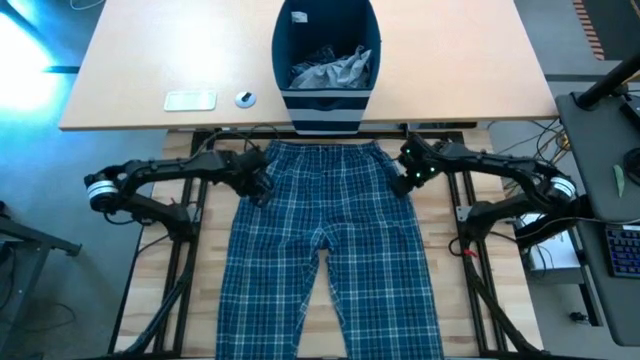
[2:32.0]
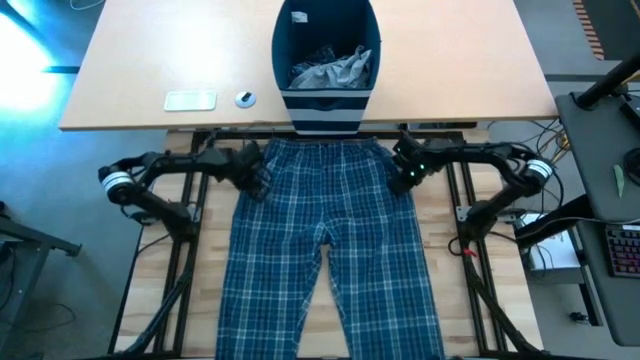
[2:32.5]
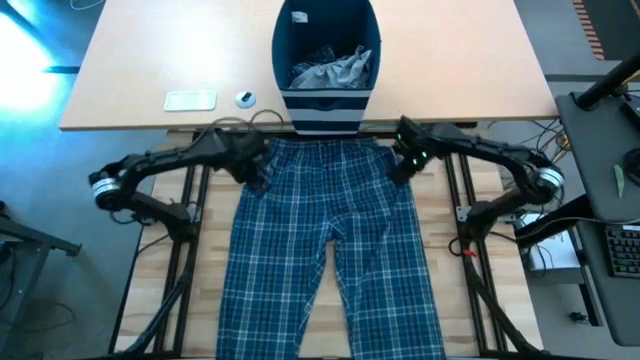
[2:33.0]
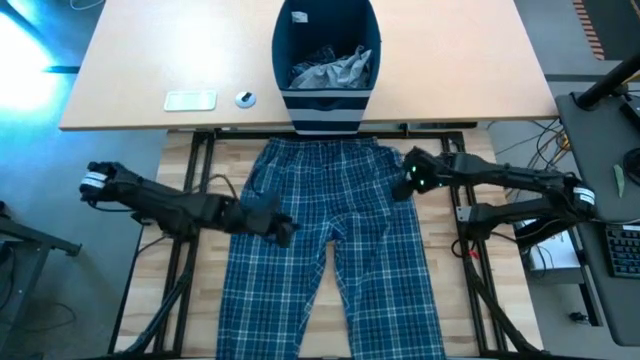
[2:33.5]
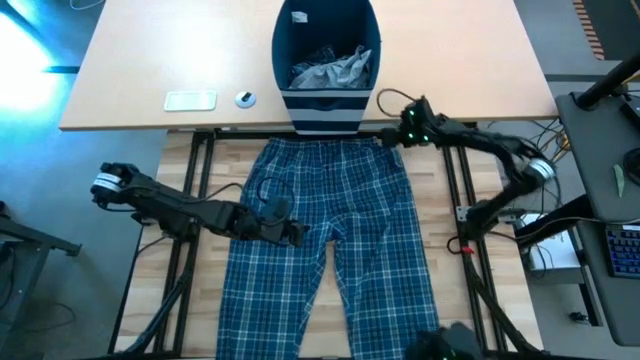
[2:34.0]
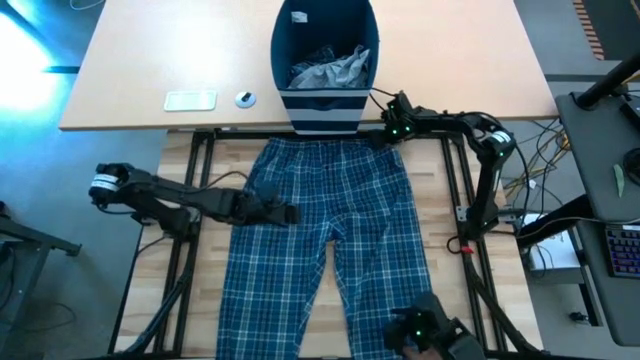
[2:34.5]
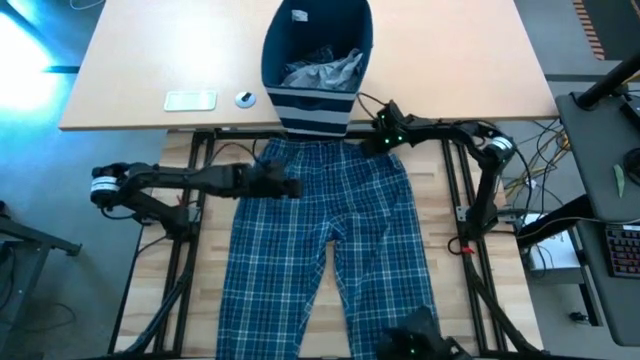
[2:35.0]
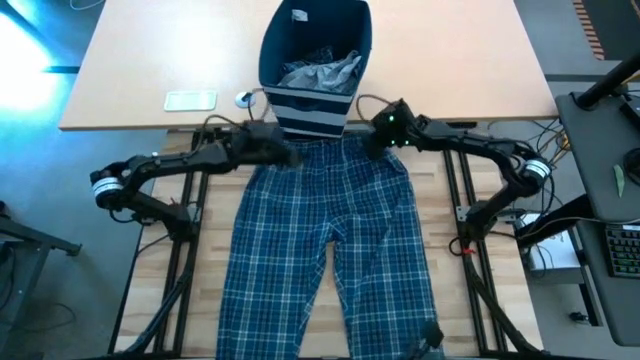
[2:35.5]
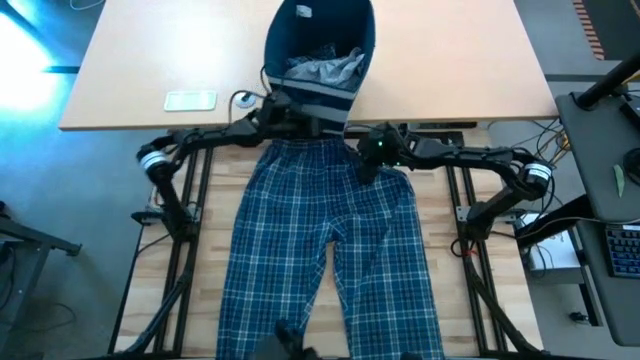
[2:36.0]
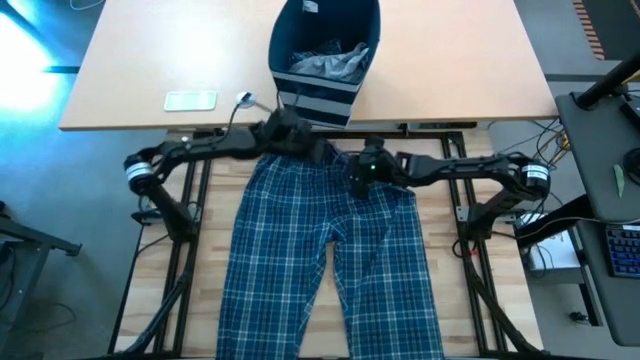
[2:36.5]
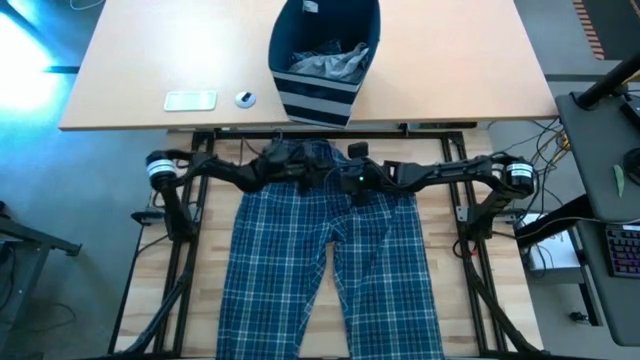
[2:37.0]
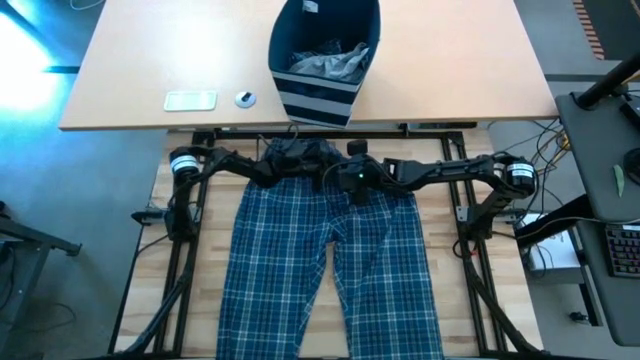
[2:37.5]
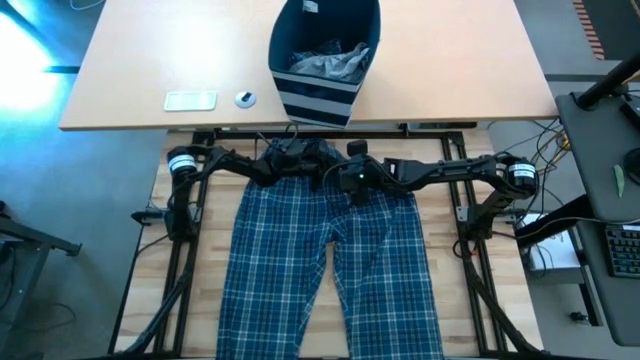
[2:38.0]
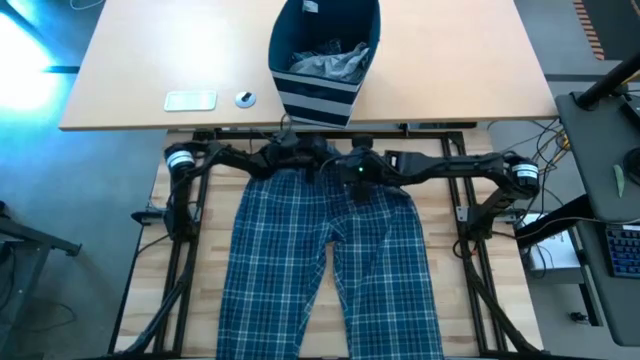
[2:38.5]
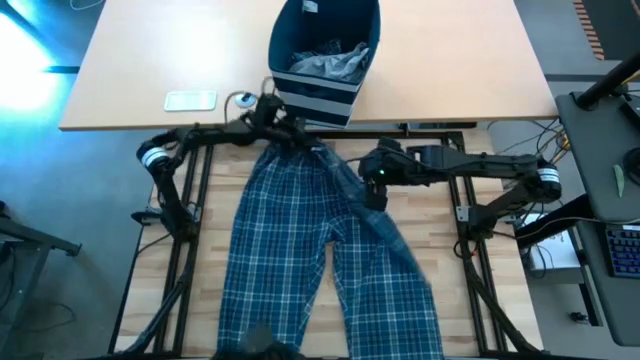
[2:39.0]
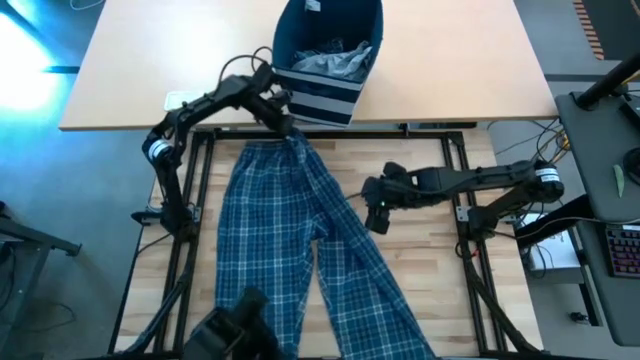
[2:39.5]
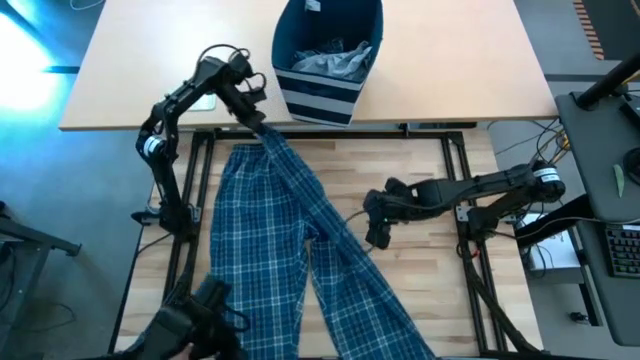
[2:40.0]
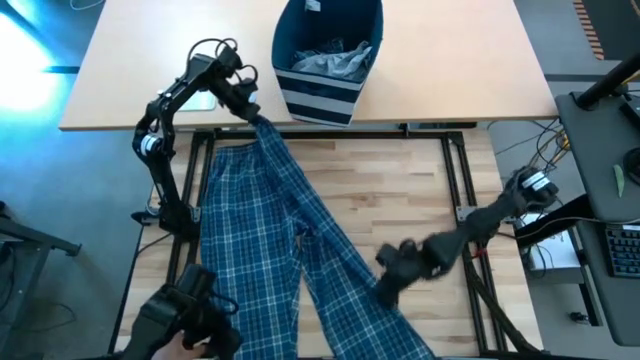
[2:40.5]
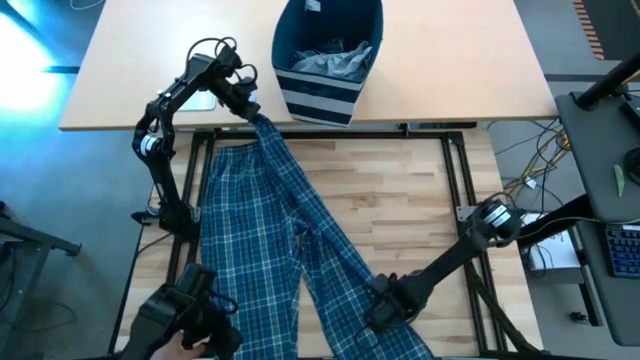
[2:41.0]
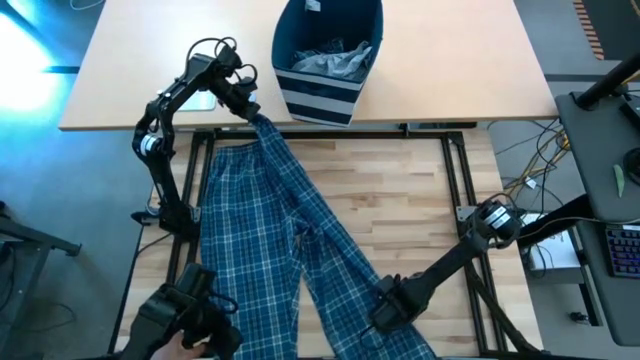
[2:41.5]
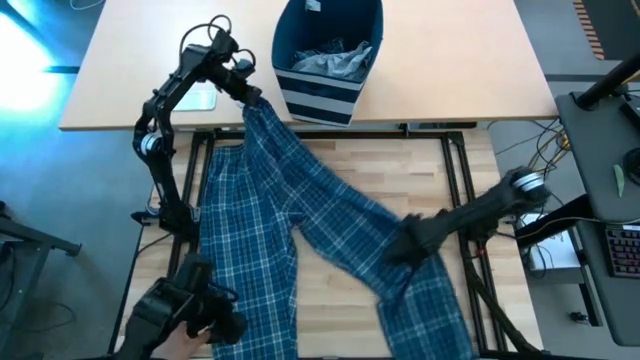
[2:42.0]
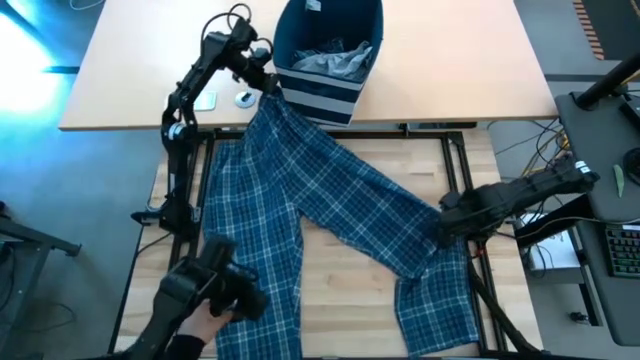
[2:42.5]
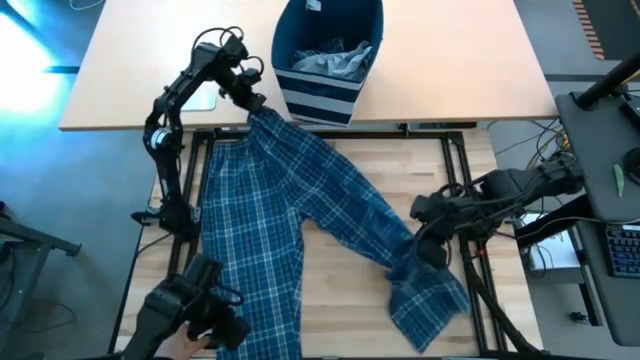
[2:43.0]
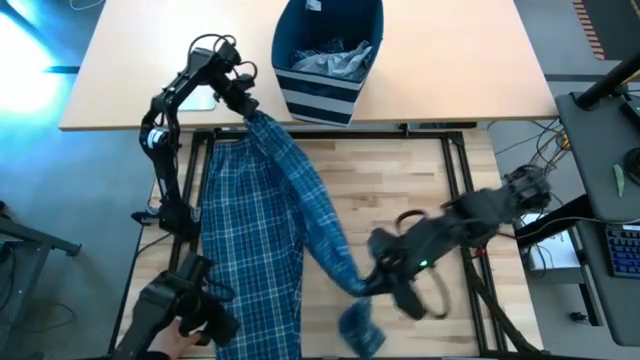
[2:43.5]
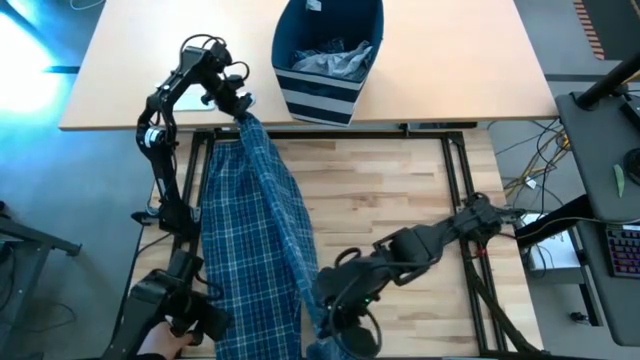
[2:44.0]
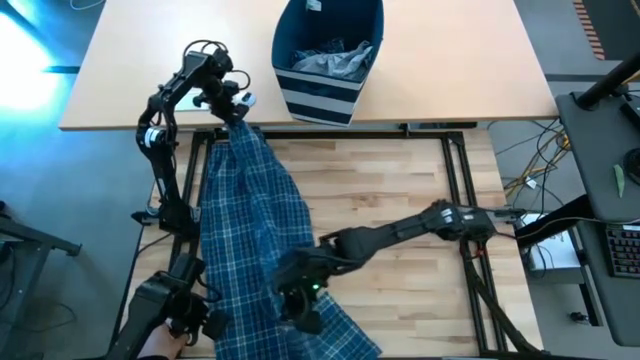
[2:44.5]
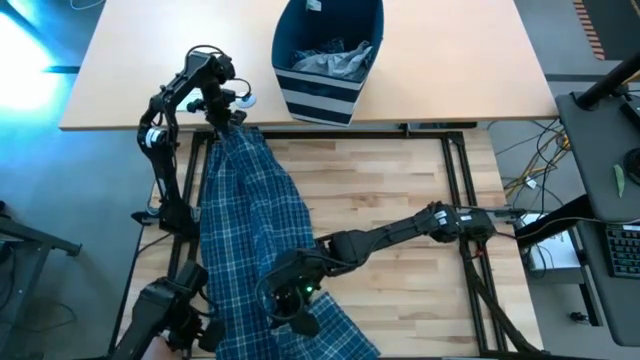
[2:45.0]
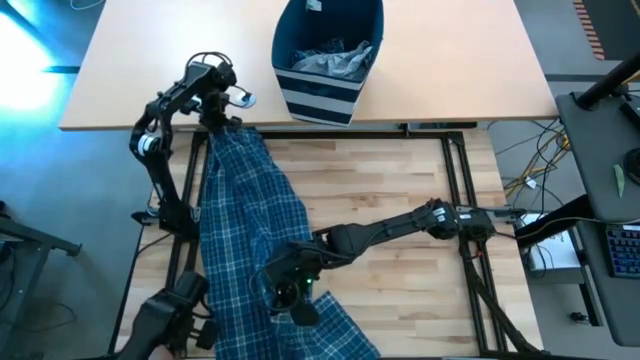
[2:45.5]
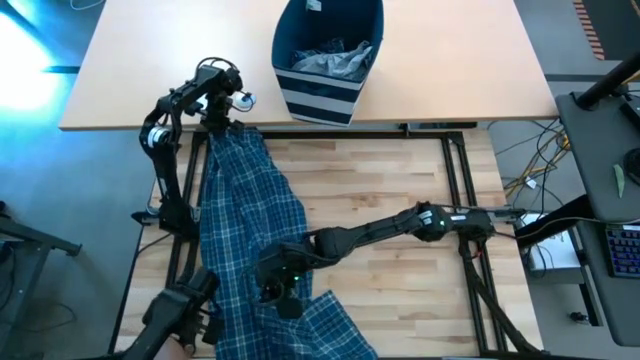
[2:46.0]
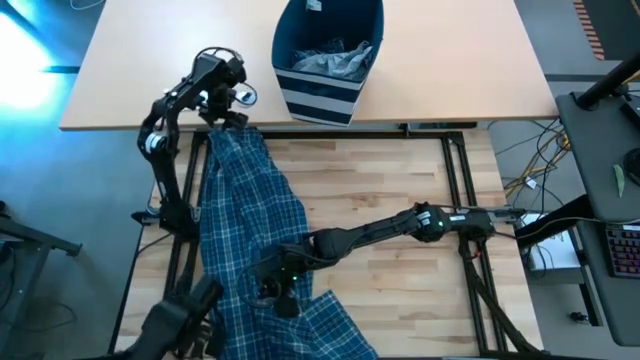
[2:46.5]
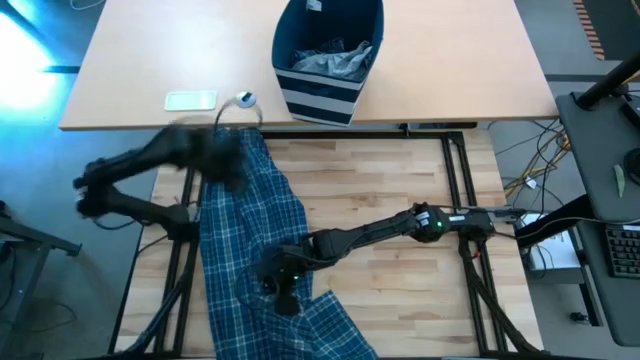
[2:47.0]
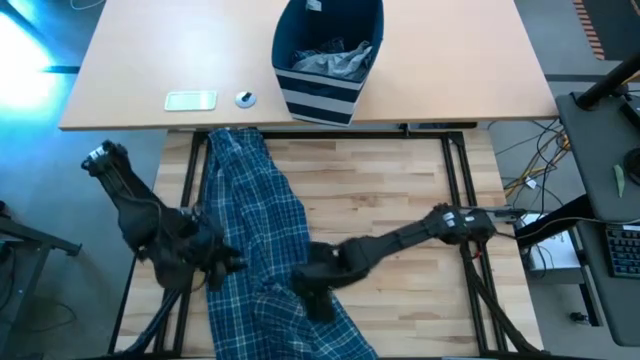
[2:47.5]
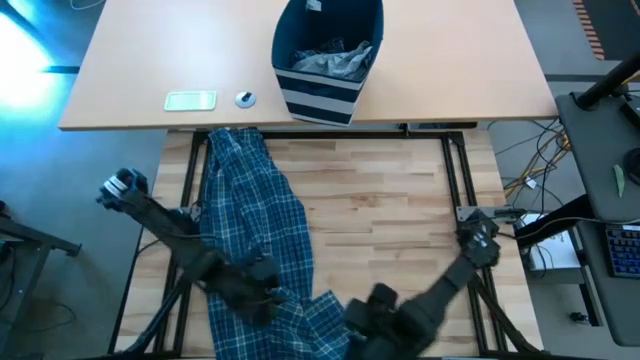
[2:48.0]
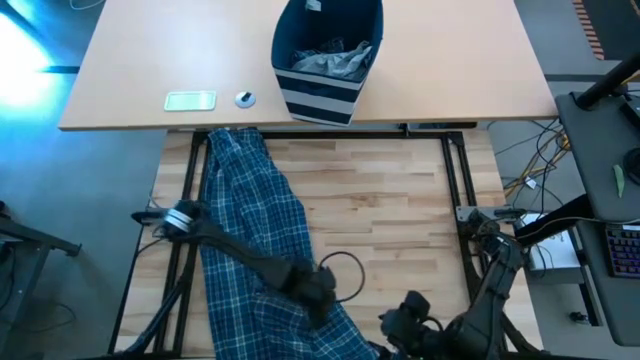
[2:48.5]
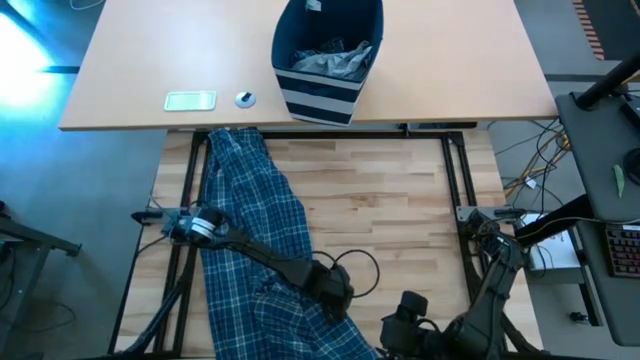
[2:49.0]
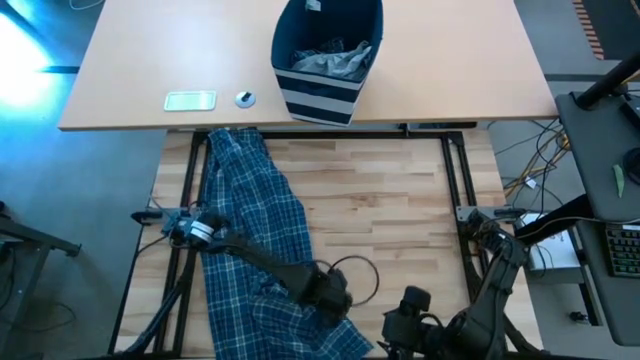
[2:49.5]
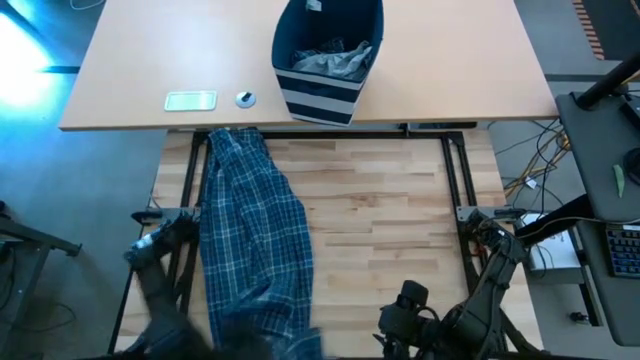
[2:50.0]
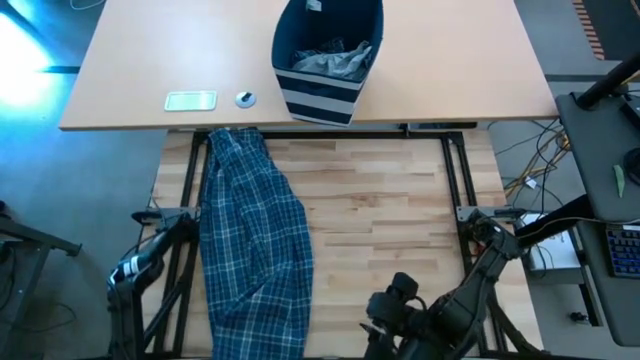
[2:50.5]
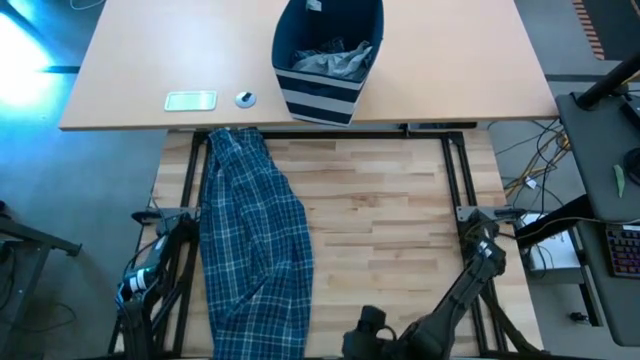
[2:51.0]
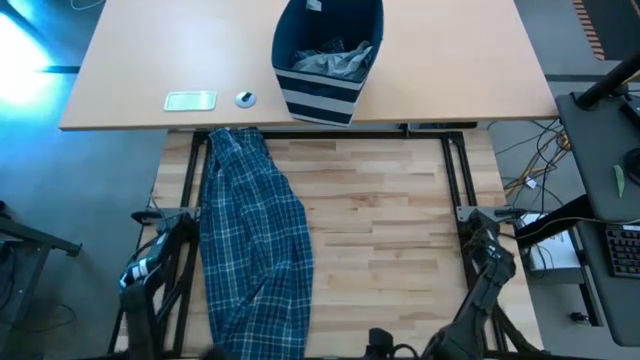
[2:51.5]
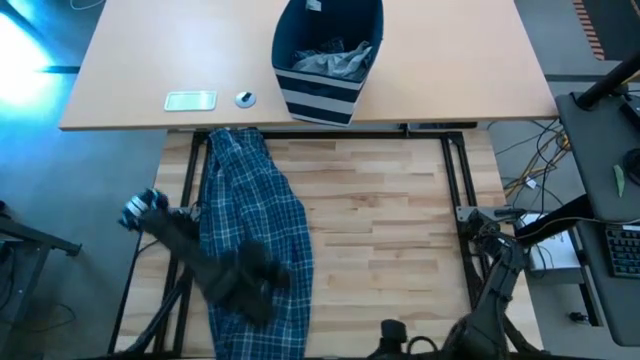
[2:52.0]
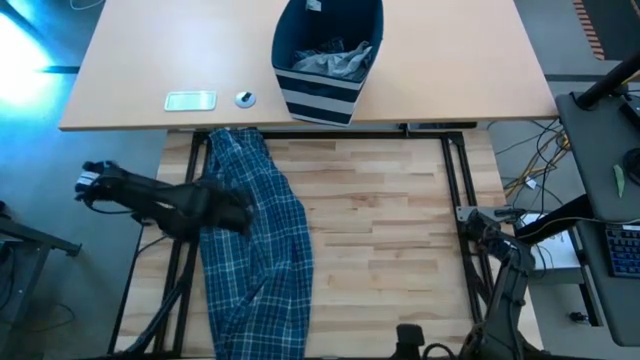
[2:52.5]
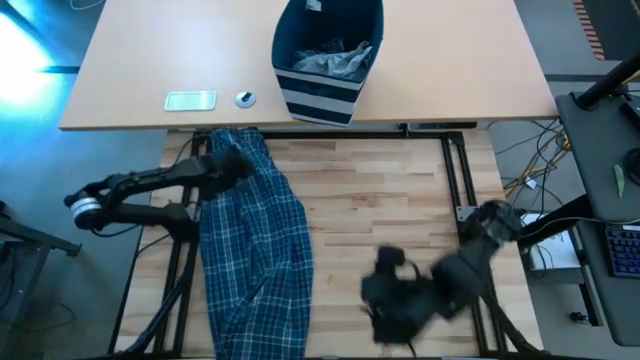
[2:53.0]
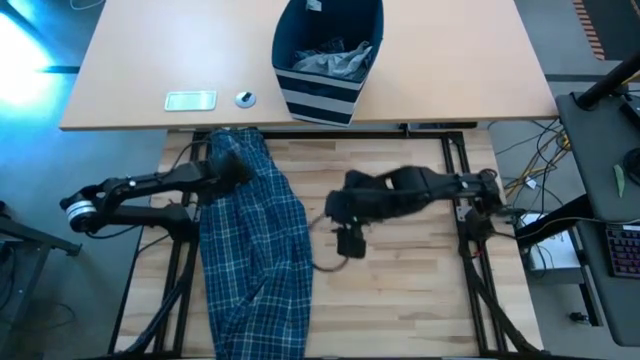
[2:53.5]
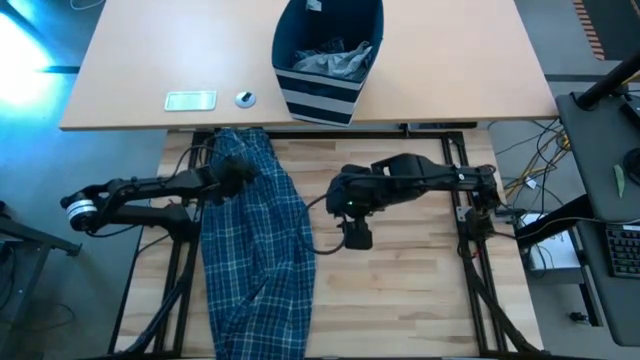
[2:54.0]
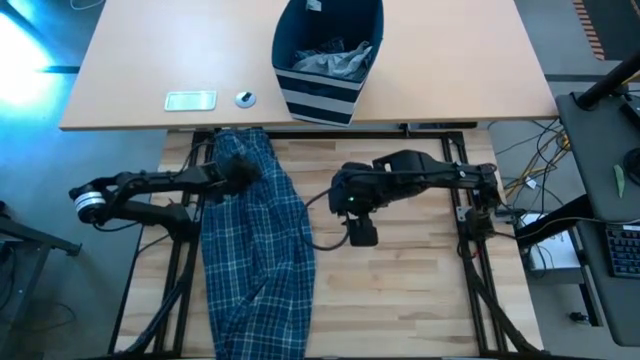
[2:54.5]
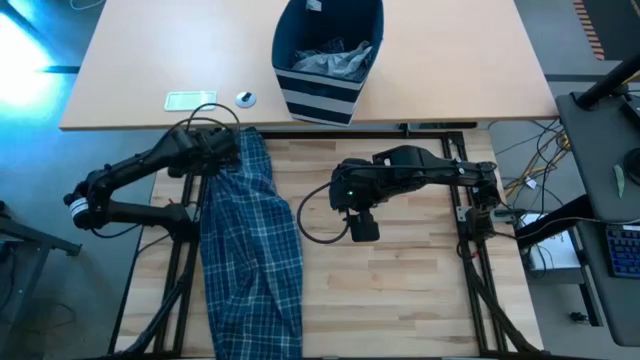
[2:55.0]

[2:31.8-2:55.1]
Task: Fold Laundry from Bin
Fold the blue patterned pants
